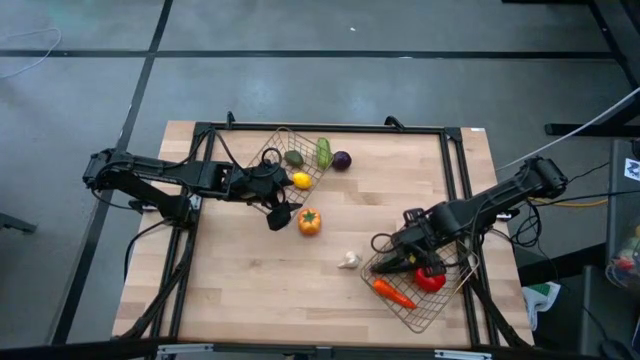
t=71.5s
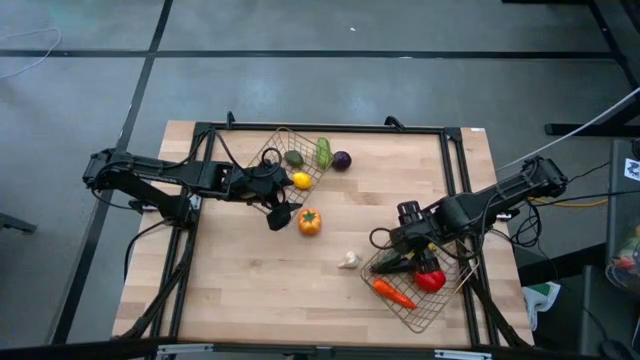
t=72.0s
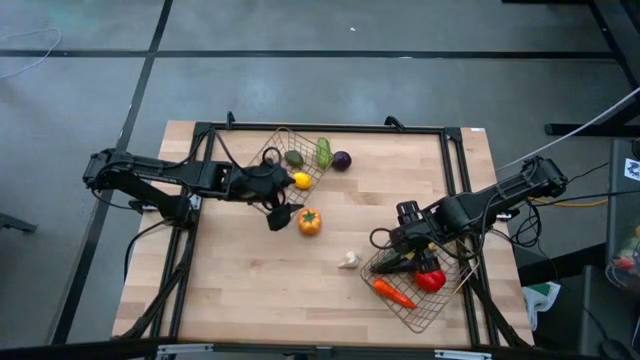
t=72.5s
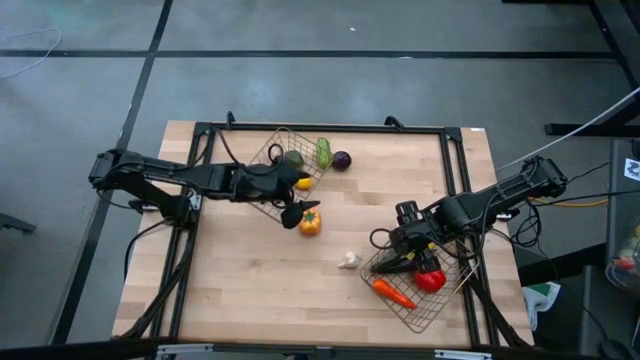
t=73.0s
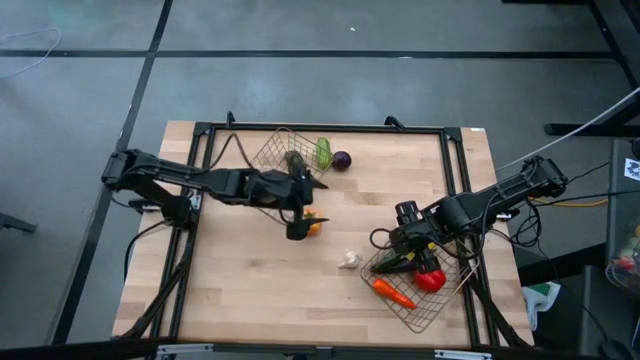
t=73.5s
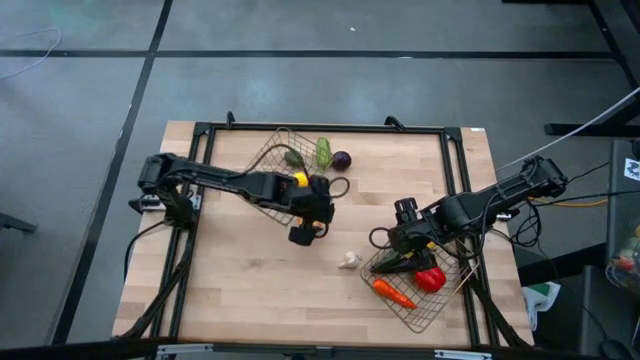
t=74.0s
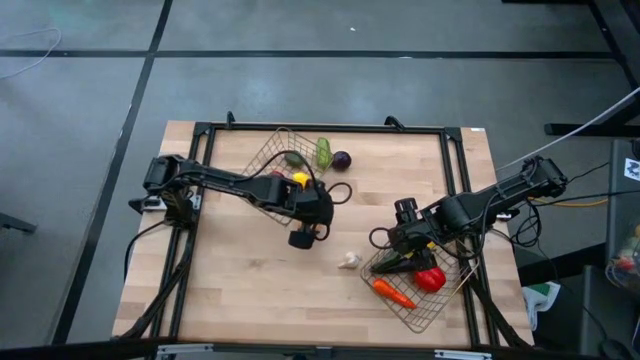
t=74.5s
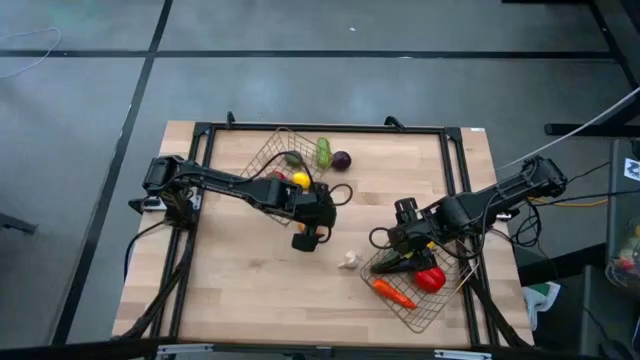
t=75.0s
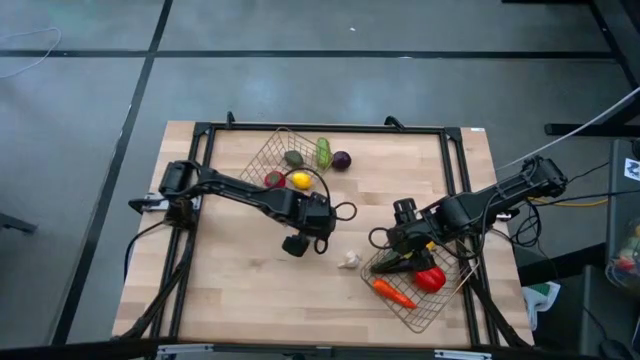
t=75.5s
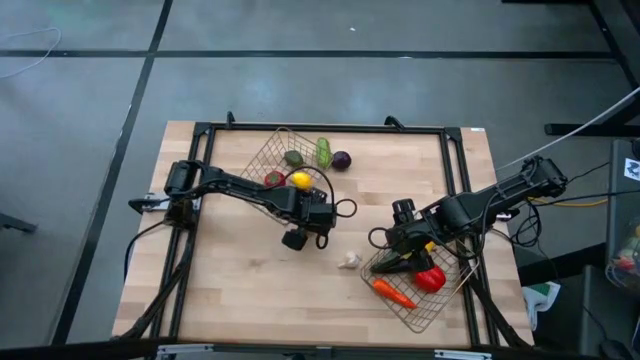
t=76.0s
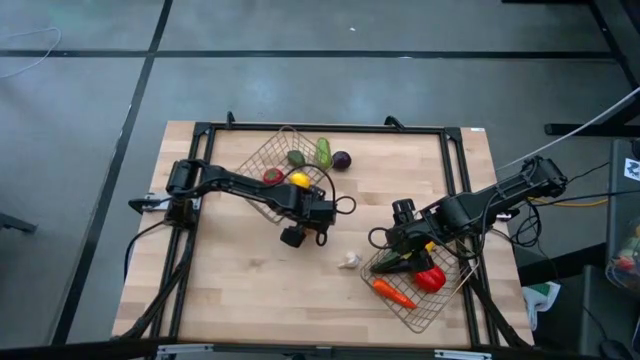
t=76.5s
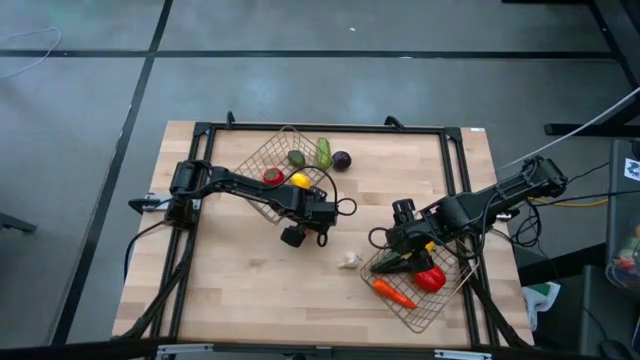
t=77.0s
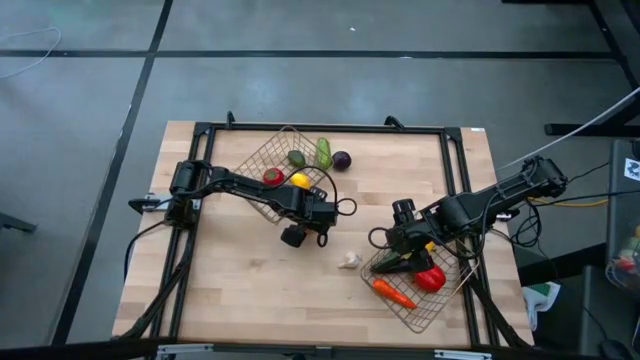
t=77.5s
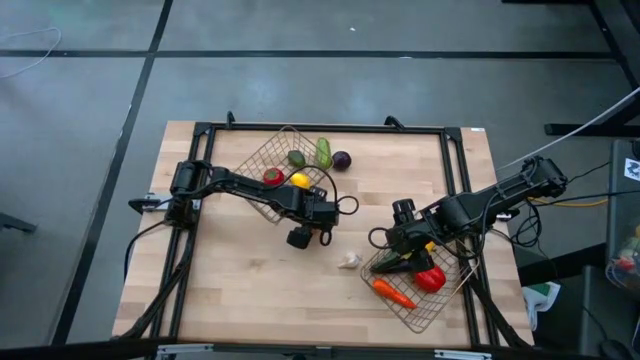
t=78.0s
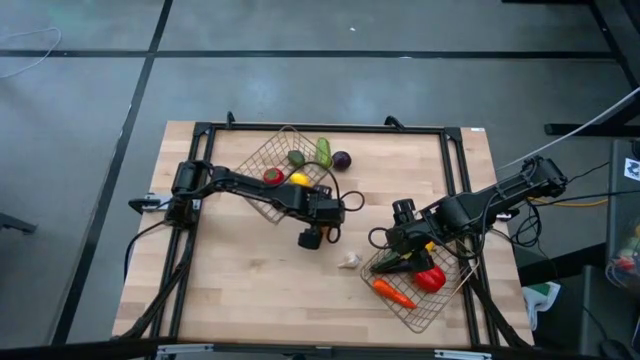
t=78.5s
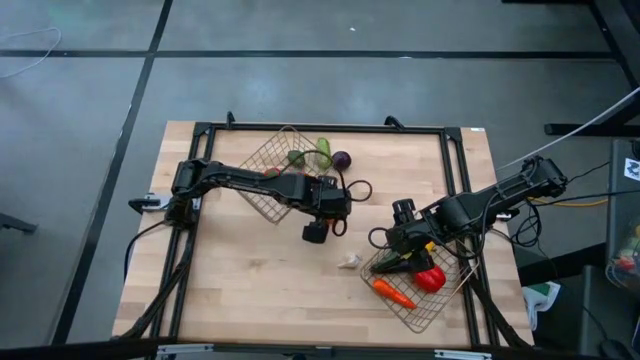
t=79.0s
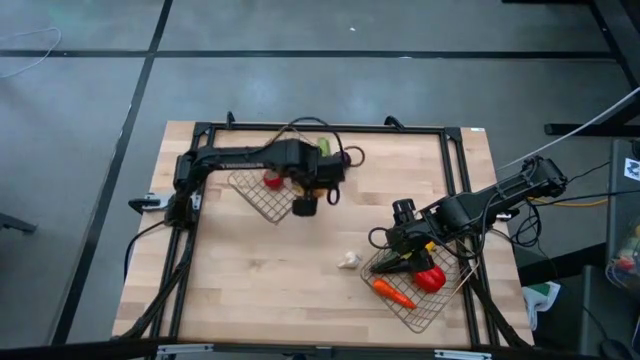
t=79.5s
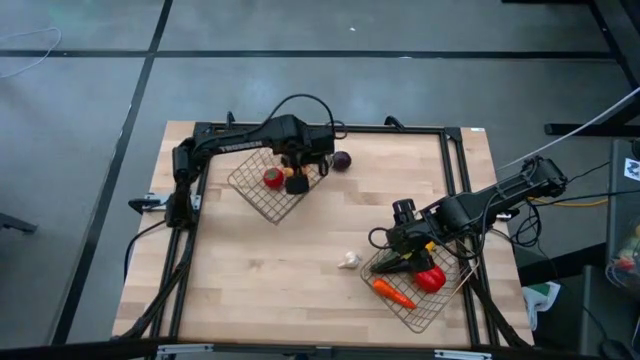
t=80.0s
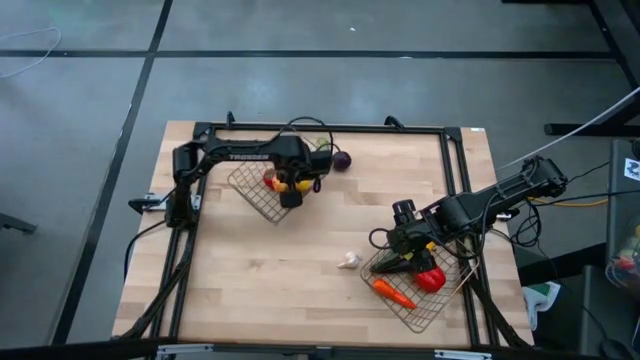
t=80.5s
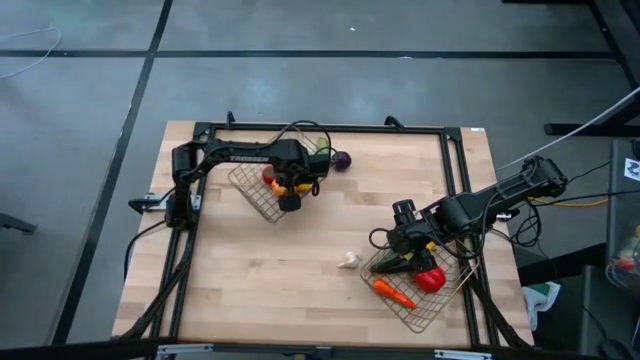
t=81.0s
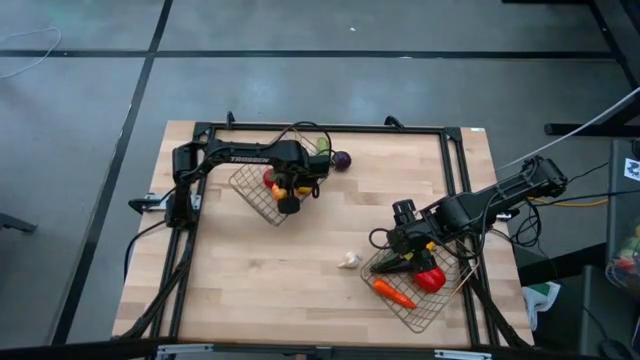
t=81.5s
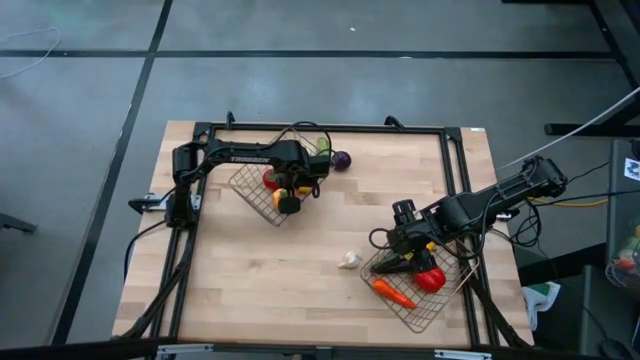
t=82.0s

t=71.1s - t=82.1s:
Task: Sort produce into baskets
Put the orange bell pepper into the wire basket

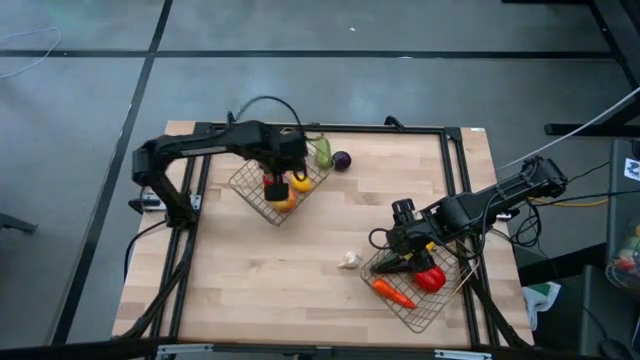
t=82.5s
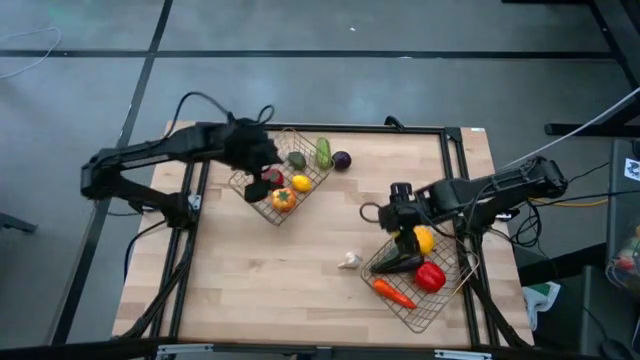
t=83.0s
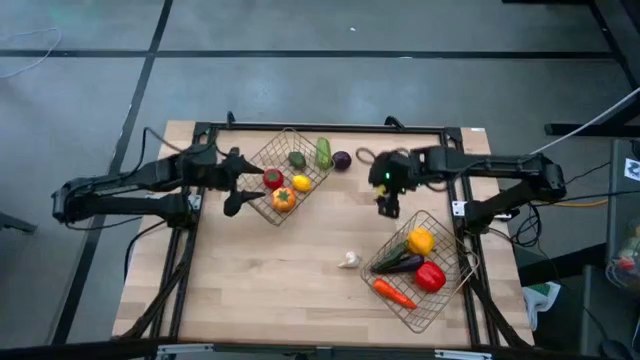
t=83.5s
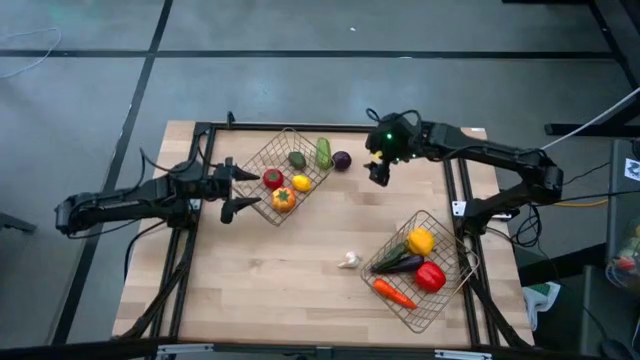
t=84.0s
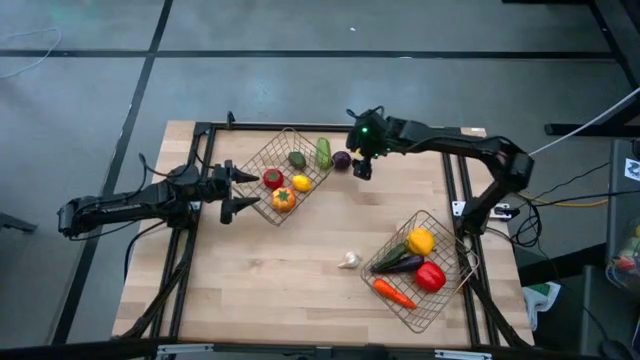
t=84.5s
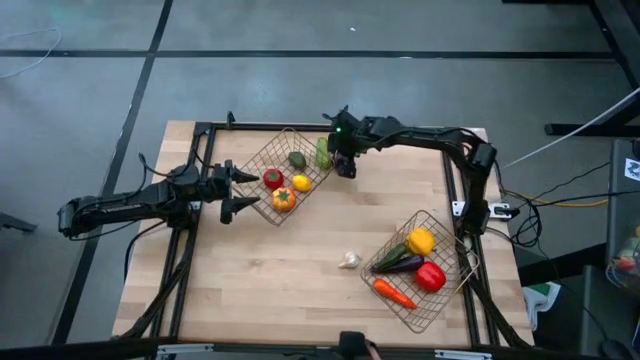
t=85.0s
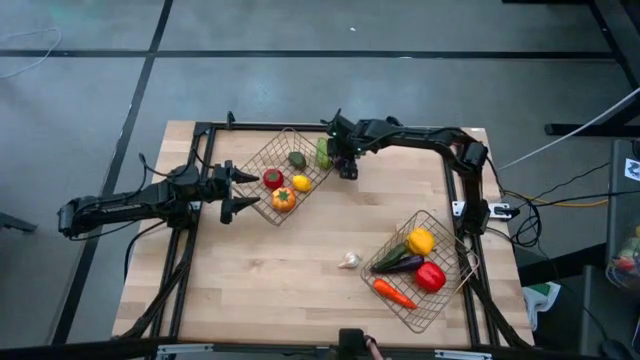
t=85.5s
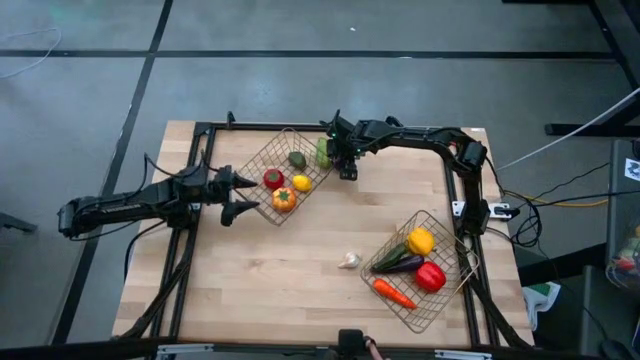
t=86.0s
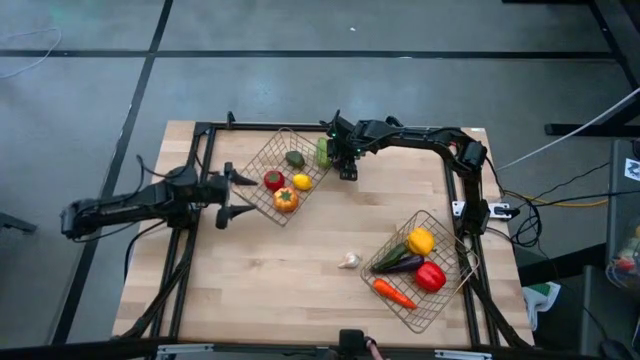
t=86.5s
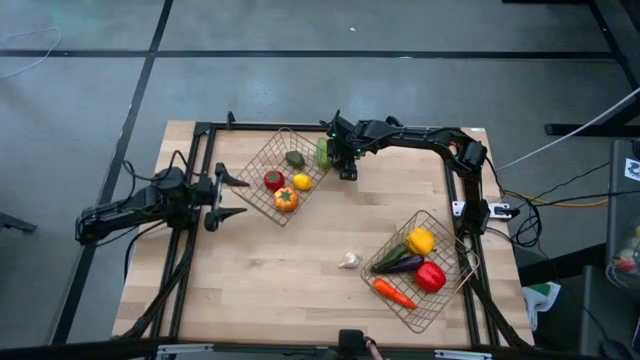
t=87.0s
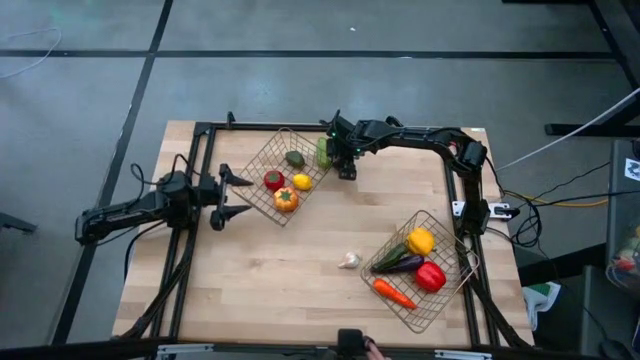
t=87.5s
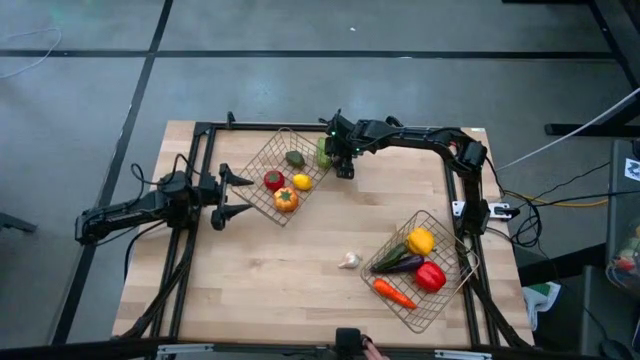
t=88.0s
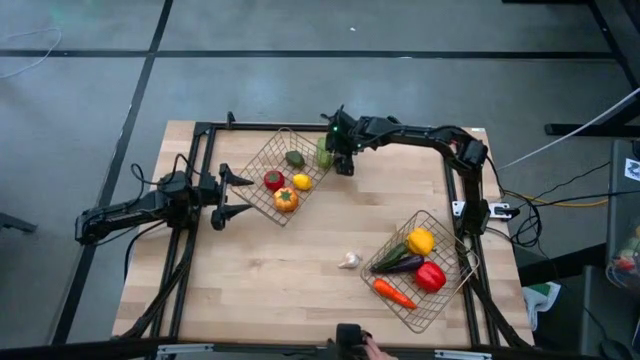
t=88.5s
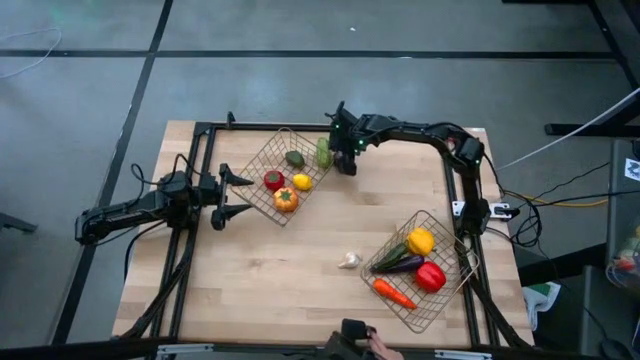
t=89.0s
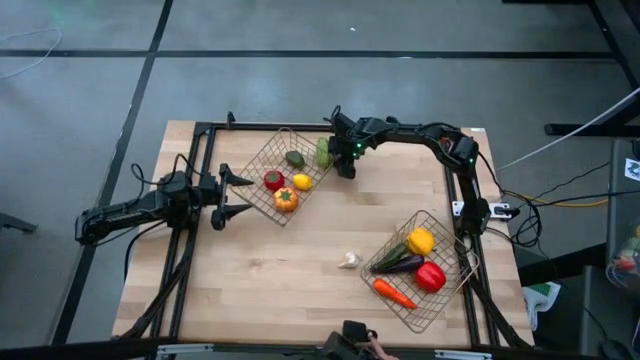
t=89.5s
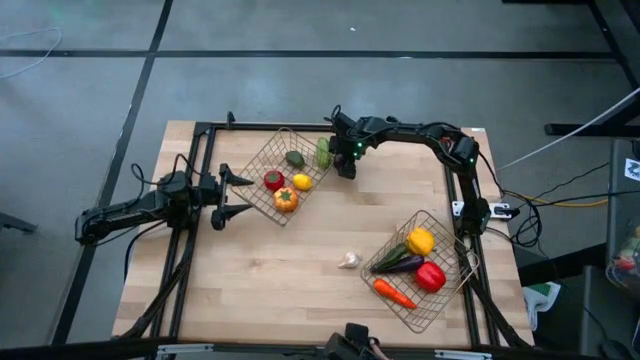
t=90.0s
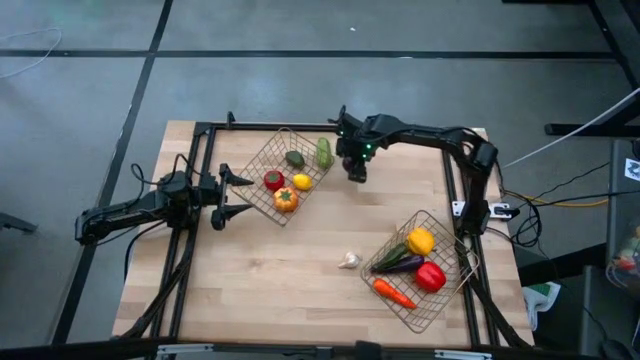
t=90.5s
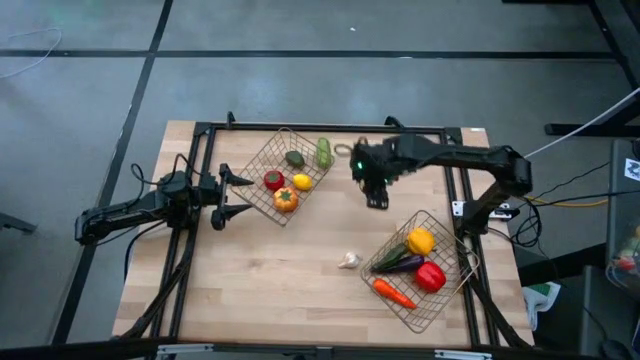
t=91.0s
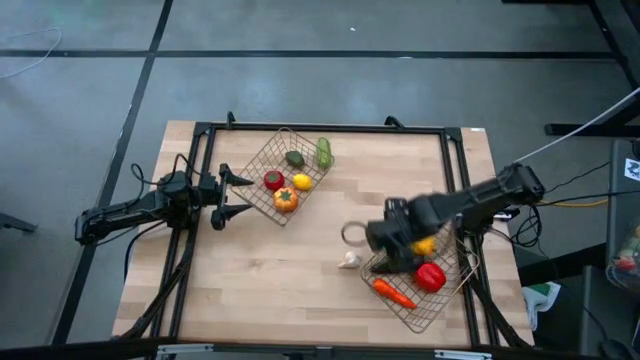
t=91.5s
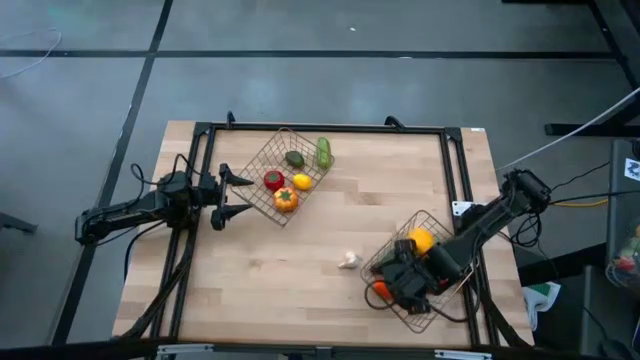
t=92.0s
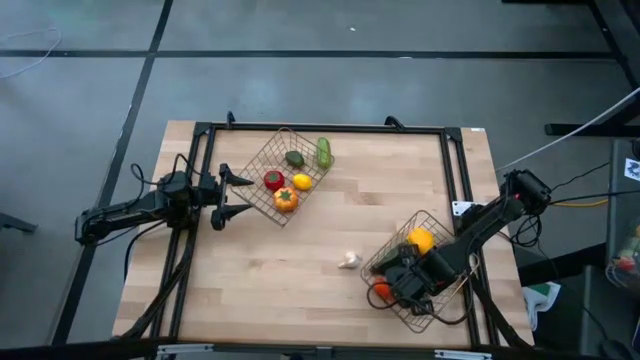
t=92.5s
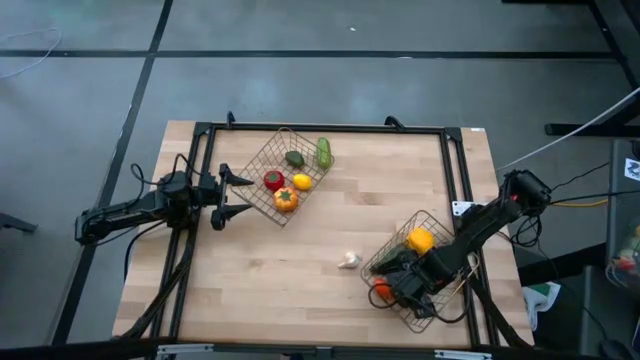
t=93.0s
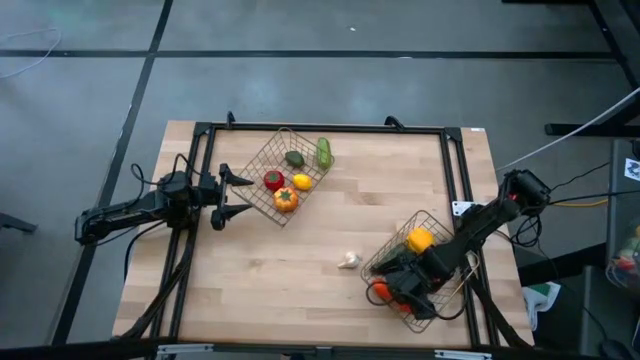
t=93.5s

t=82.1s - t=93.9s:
Put the purple avocado into the bottom basket
